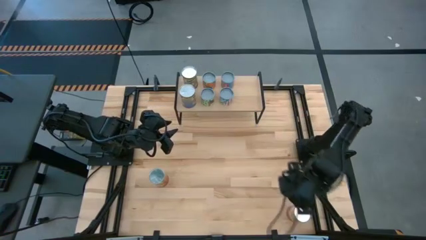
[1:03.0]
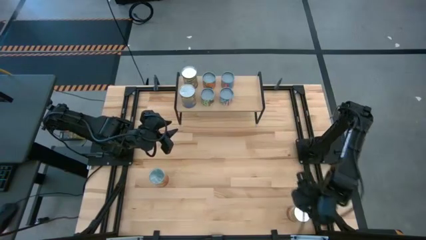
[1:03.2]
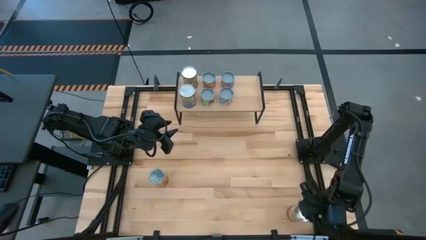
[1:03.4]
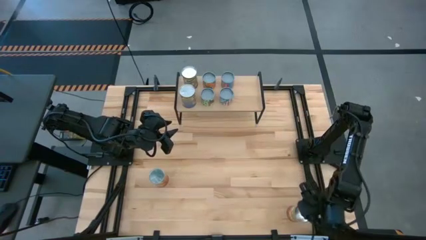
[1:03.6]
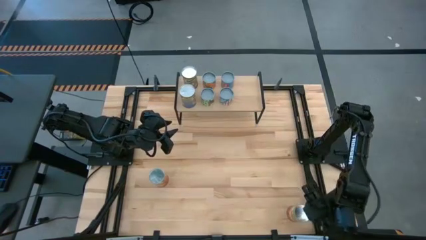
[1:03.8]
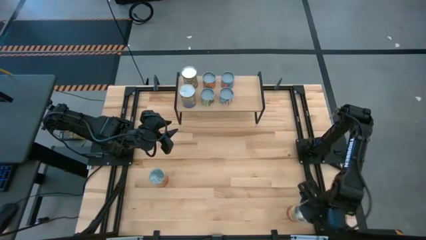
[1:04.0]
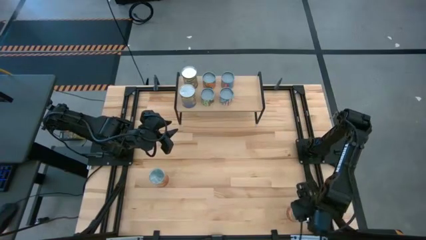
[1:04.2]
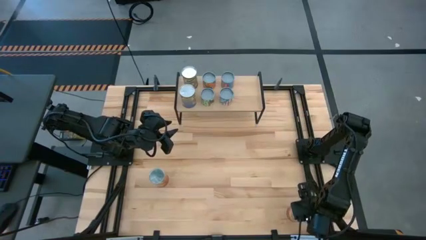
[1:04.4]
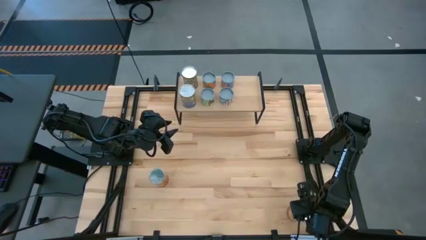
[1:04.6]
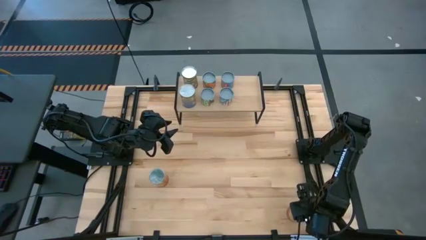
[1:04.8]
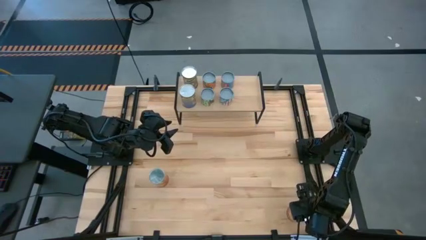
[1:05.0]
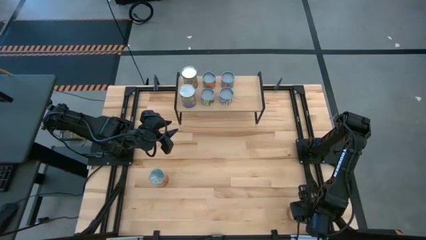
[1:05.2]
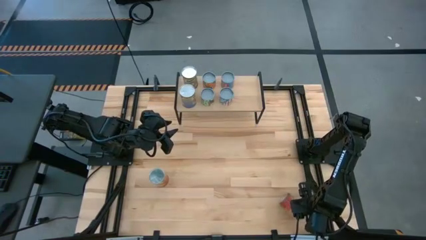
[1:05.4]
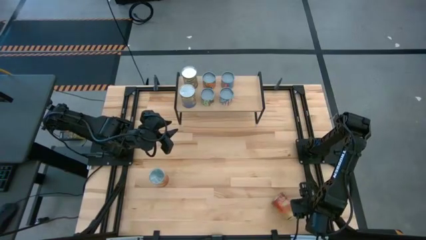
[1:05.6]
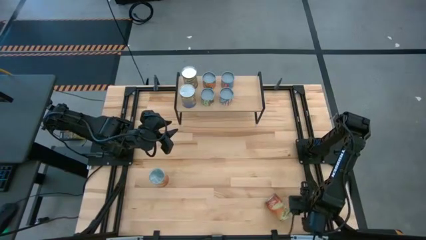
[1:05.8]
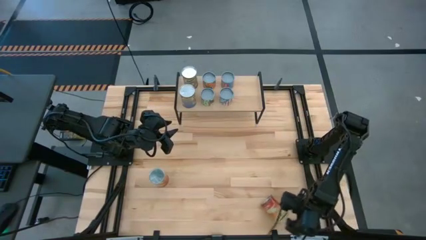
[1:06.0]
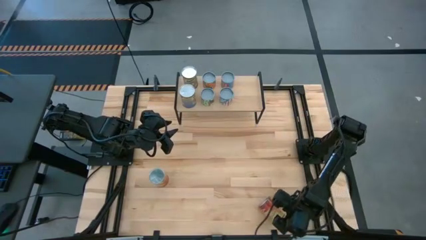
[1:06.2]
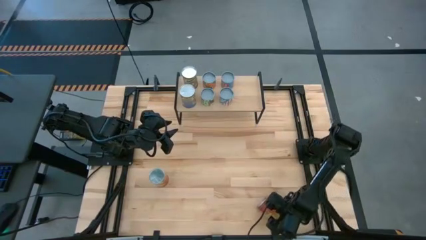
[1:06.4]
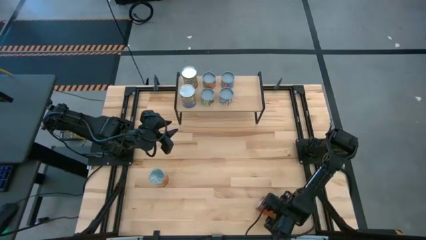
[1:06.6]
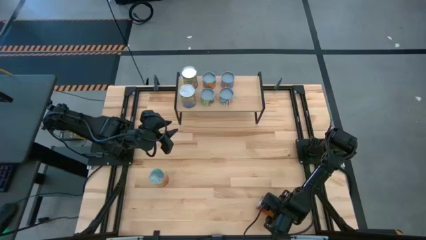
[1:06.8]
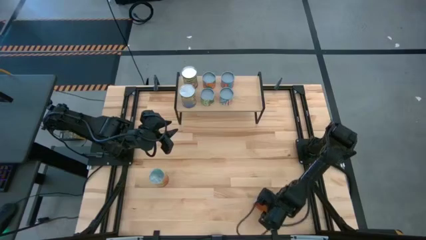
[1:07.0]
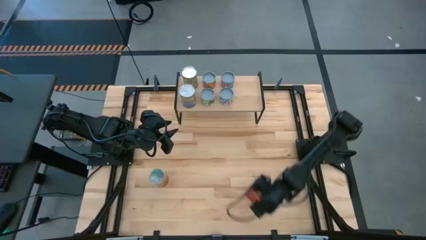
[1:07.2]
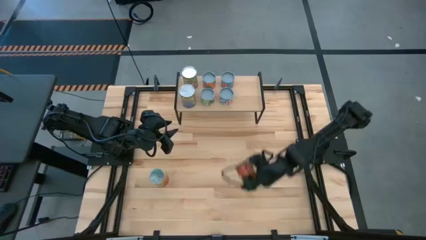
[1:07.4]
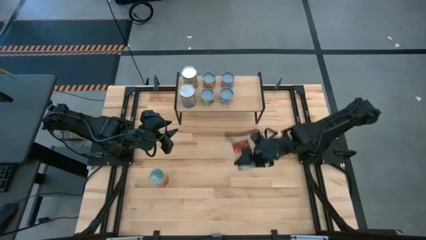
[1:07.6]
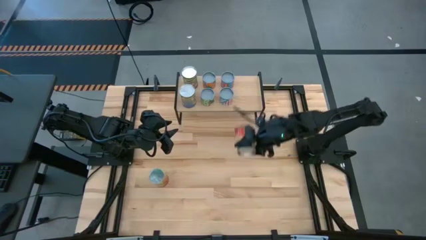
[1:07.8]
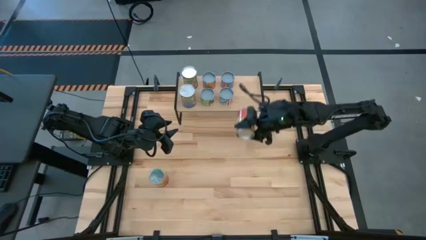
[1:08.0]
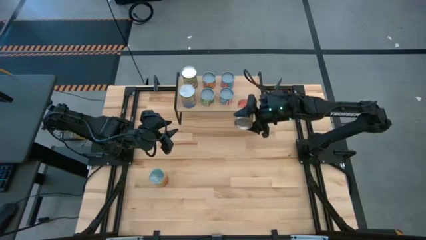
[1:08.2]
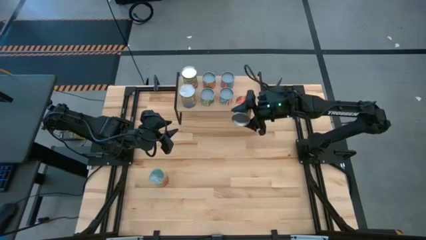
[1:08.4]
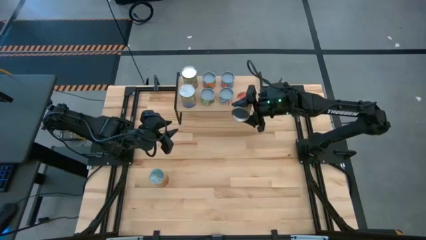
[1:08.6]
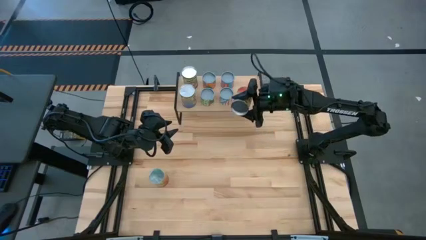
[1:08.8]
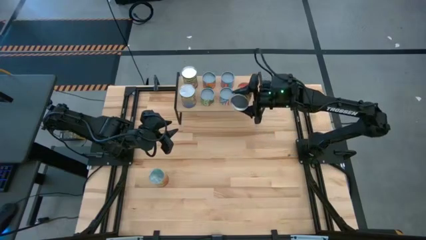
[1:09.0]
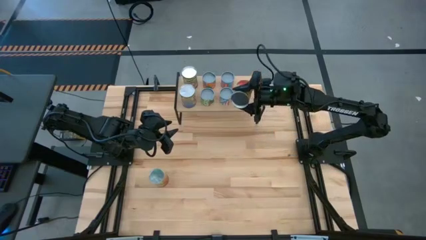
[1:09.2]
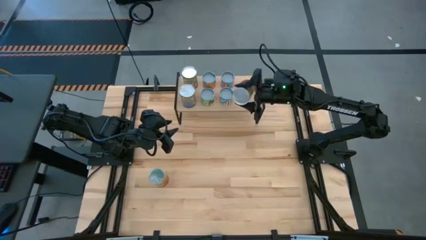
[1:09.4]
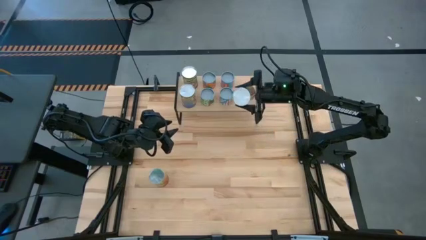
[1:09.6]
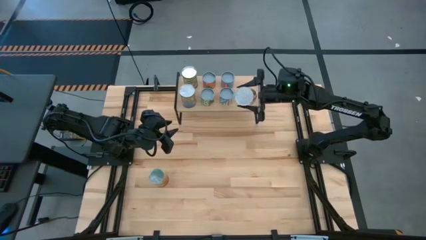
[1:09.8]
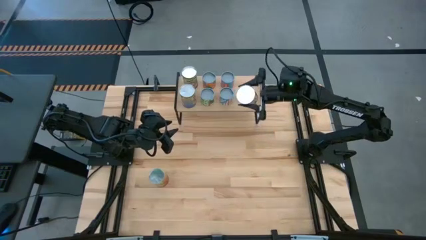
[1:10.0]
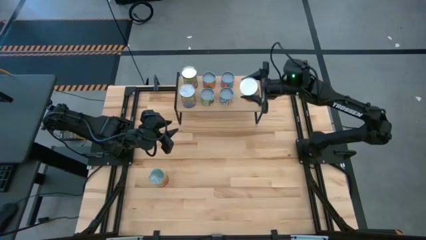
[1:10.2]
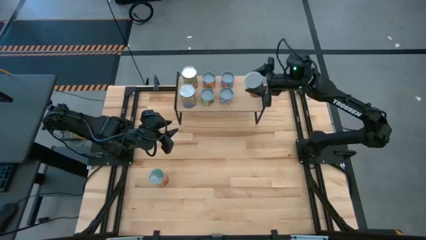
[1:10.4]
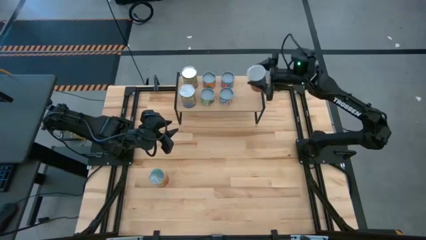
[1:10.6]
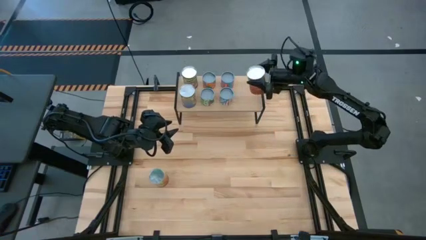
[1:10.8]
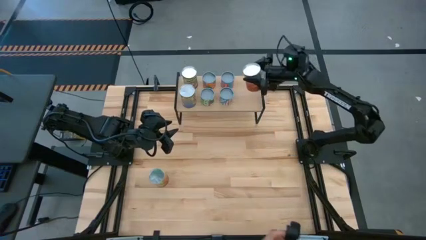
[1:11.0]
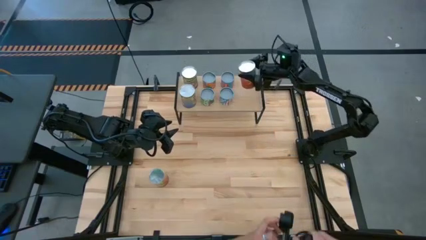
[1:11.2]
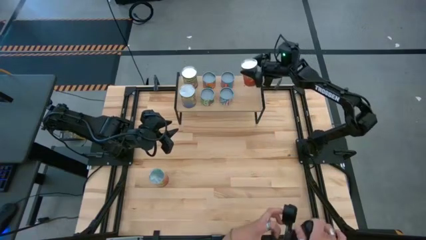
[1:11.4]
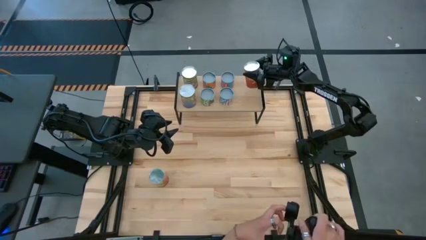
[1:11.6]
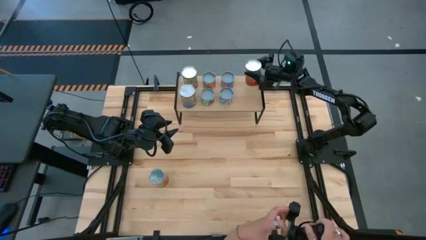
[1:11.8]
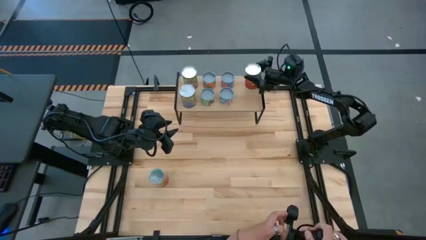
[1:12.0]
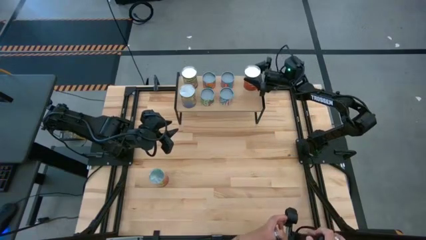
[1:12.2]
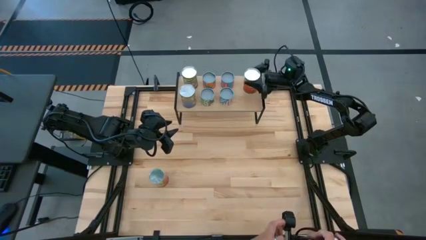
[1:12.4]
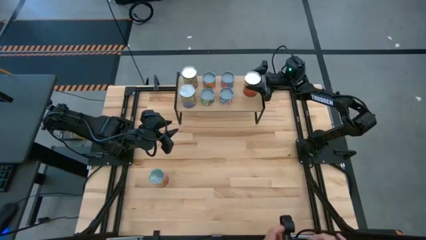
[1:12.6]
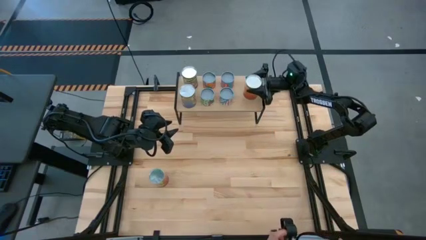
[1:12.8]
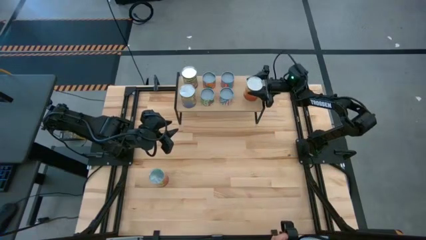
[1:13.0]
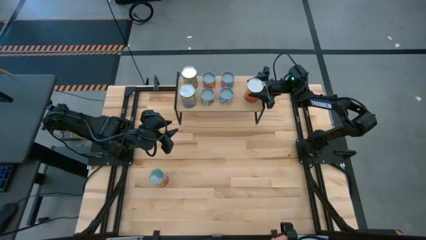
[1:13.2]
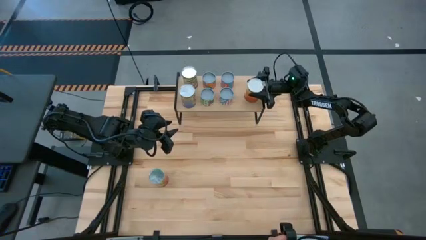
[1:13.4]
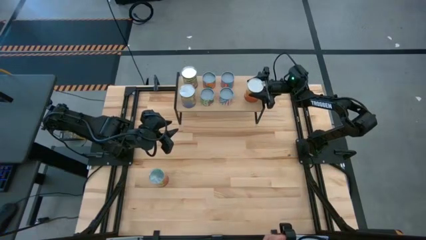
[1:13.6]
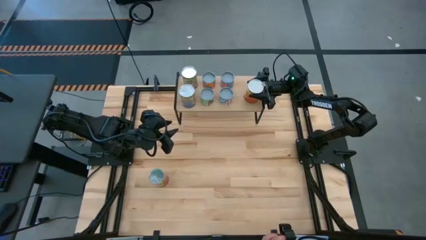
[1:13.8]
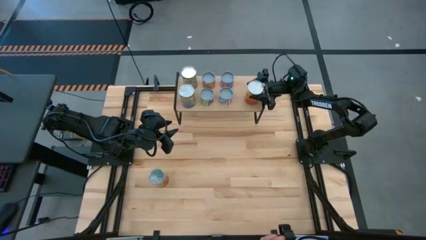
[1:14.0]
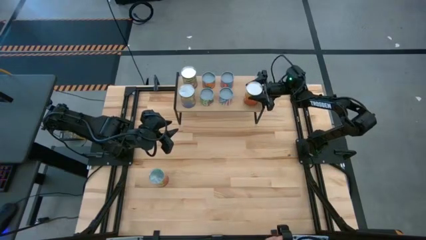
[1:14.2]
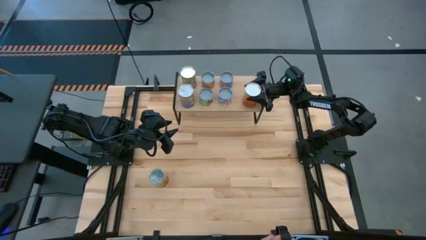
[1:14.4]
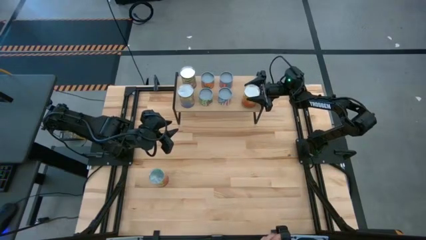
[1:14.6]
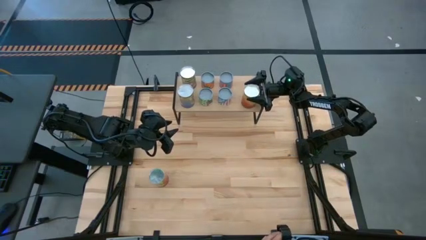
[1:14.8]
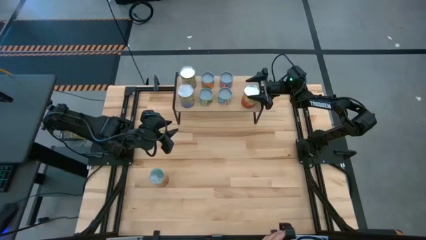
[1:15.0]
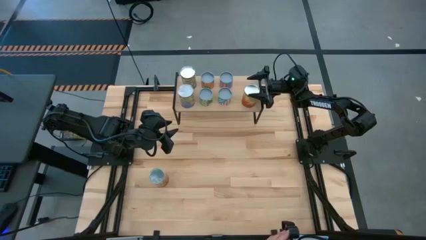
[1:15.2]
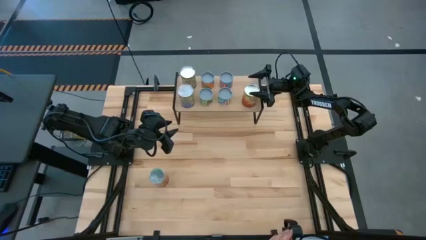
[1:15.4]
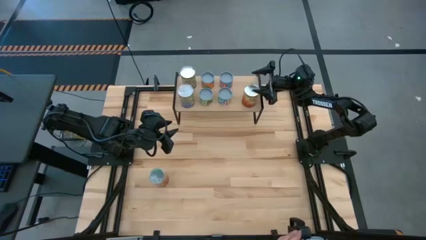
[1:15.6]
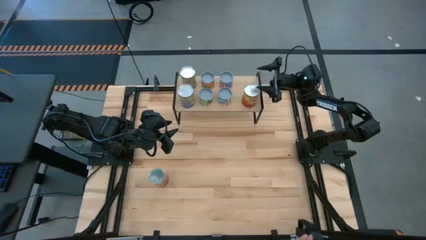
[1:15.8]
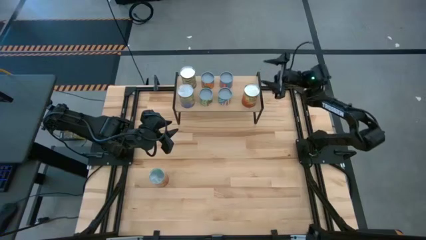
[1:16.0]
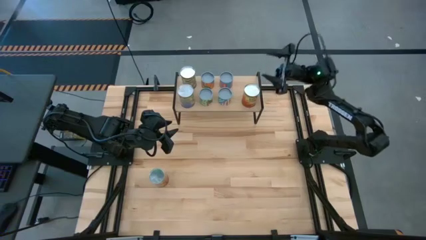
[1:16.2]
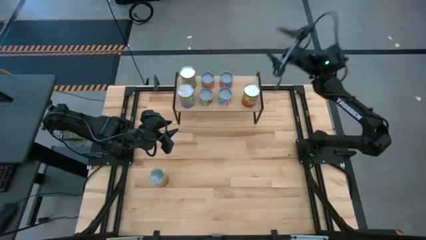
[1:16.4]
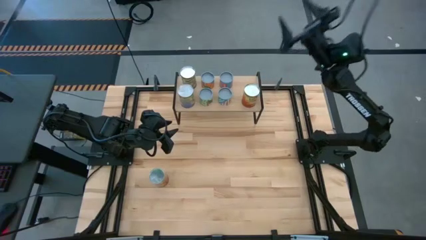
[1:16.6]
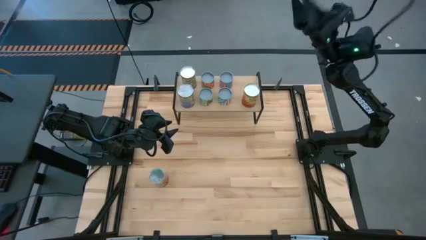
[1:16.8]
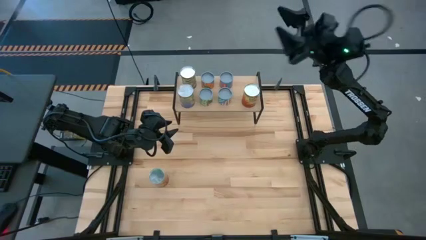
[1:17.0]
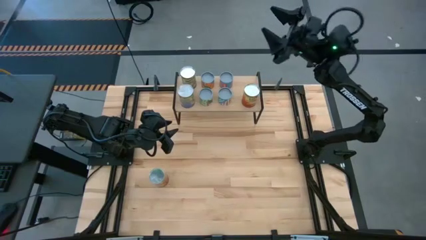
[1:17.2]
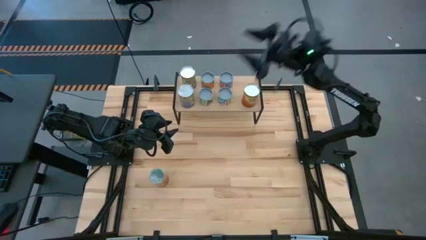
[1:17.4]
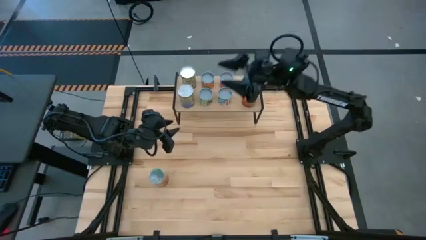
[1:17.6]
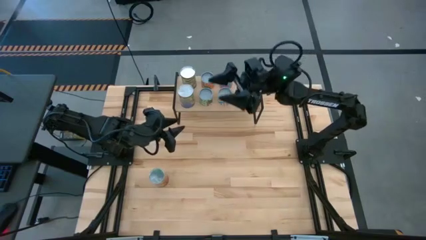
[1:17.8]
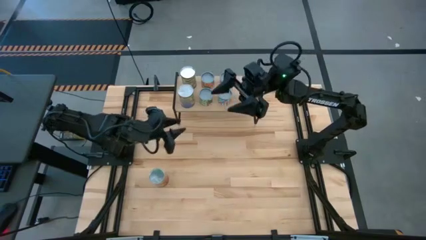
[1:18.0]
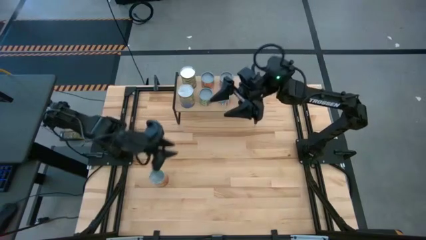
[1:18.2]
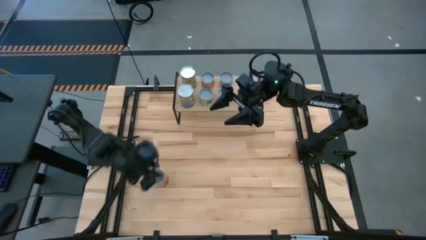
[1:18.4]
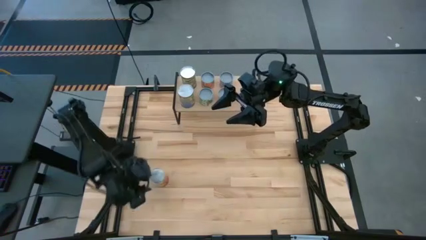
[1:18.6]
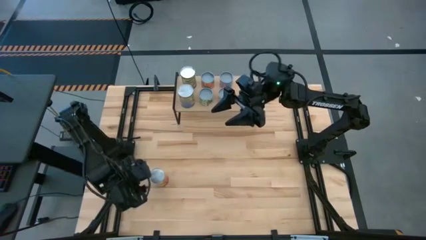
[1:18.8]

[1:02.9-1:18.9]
Task: Pick and place cans onto a shelf
Put the bottom corn can on top of the shelf

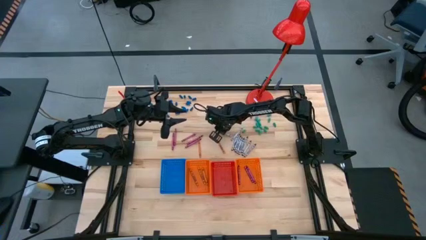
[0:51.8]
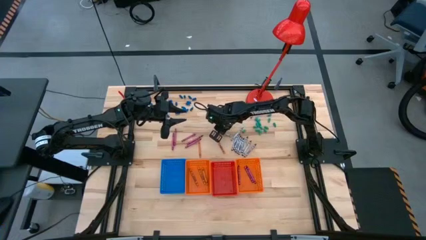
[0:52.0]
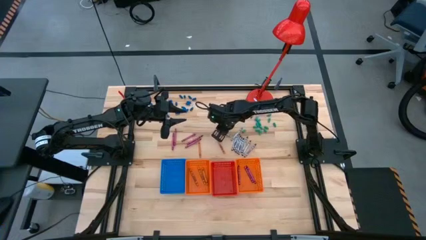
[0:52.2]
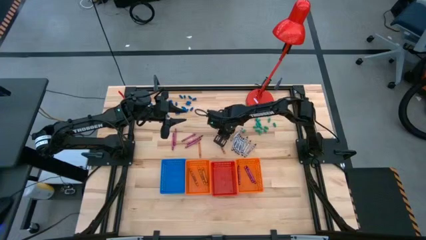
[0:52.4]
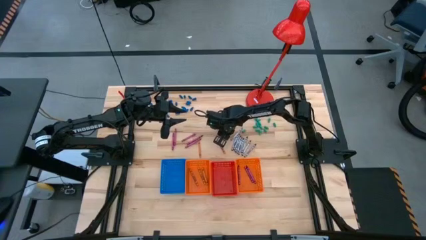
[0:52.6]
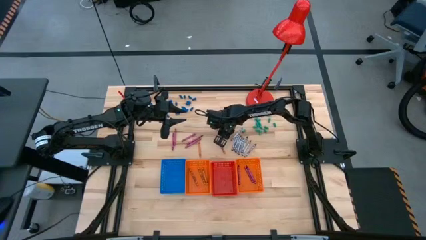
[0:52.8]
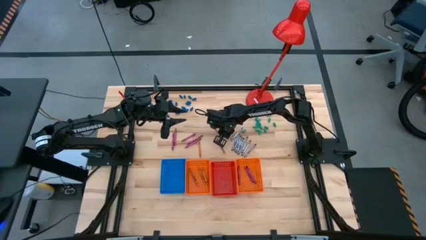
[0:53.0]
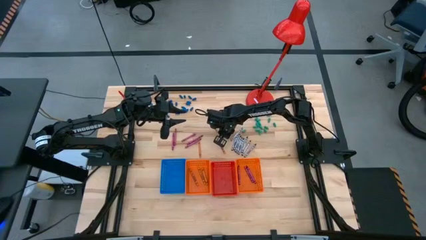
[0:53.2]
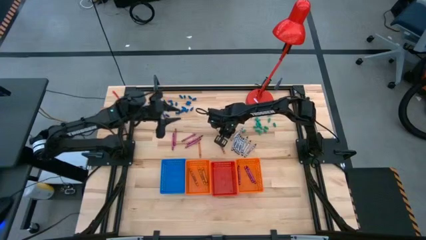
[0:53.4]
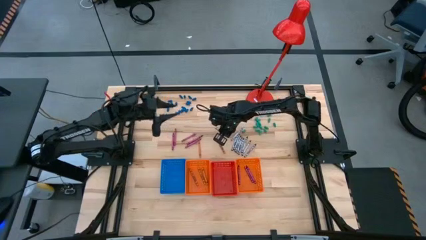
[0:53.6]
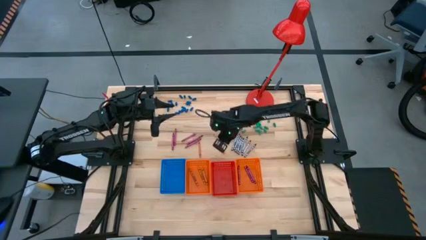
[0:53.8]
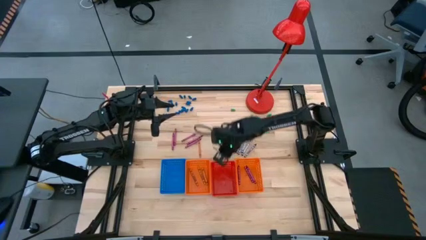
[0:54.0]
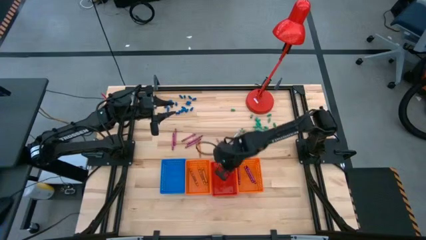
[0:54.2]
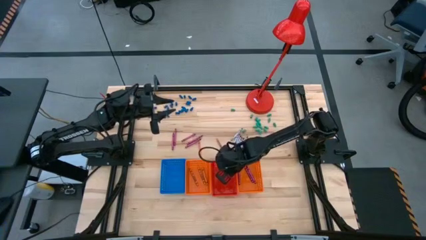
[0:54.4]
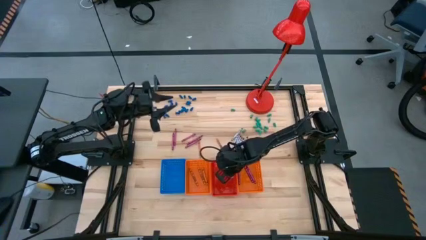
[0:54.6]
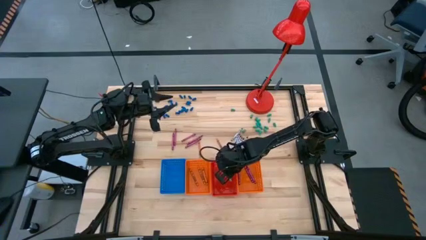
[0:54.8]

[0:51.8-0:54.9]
Task: Sort crayons
Put the gray crayon into the red bin
